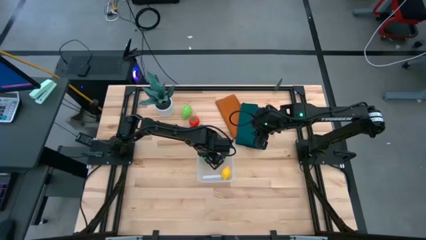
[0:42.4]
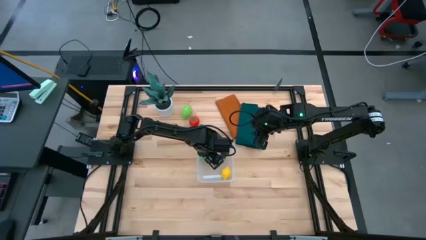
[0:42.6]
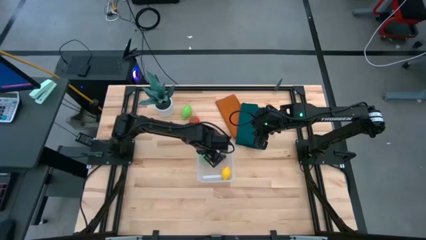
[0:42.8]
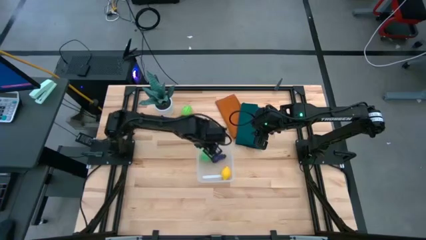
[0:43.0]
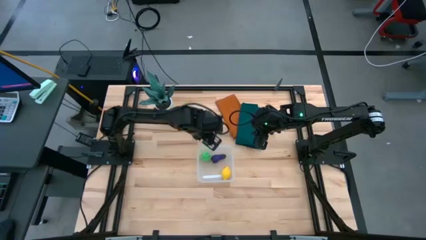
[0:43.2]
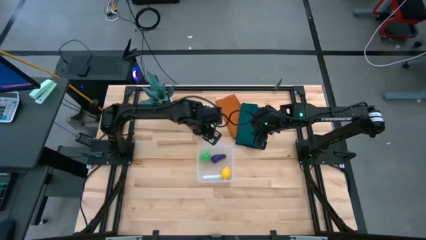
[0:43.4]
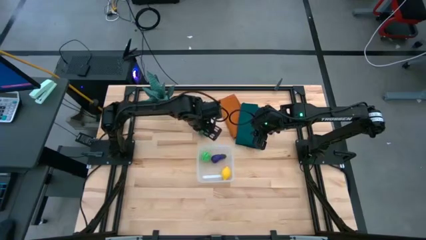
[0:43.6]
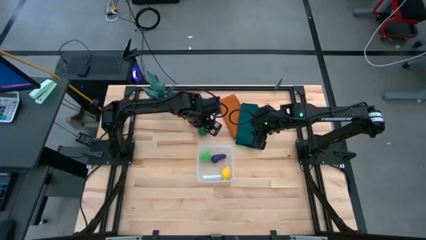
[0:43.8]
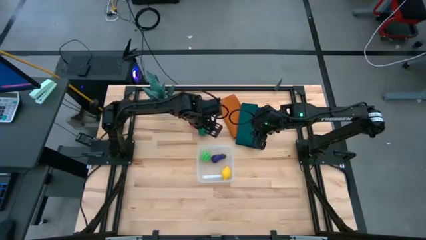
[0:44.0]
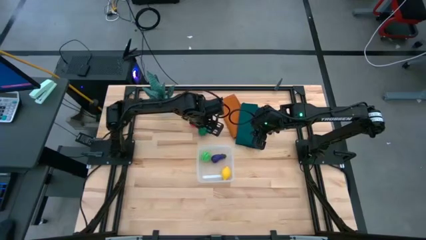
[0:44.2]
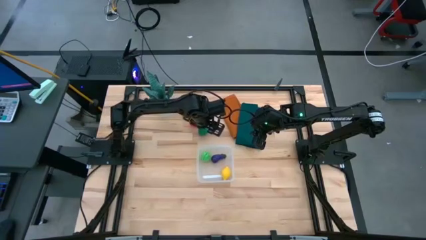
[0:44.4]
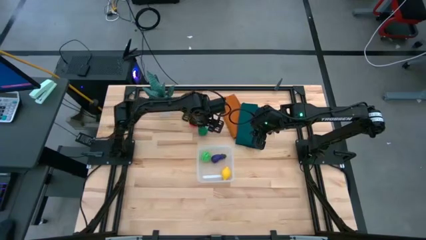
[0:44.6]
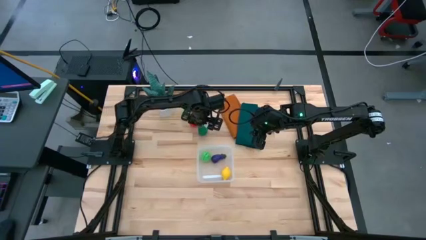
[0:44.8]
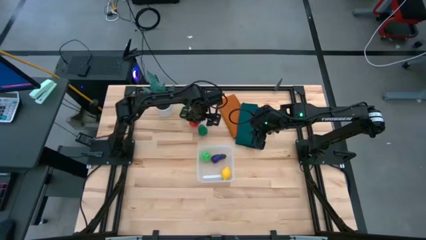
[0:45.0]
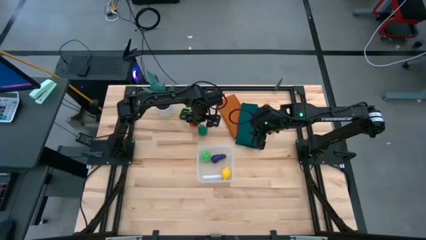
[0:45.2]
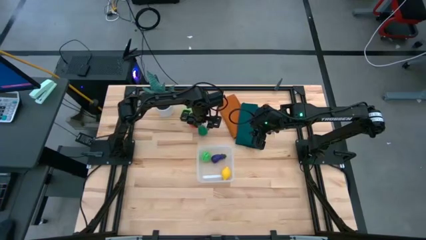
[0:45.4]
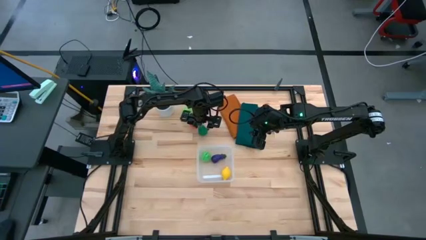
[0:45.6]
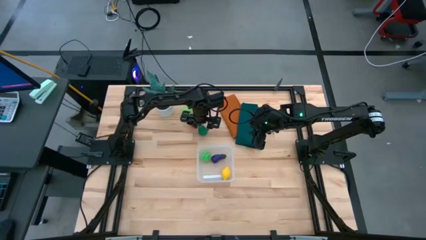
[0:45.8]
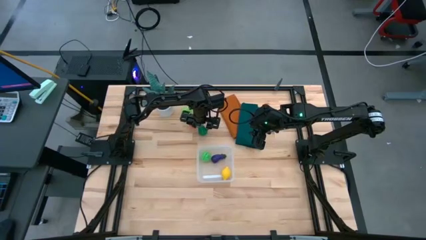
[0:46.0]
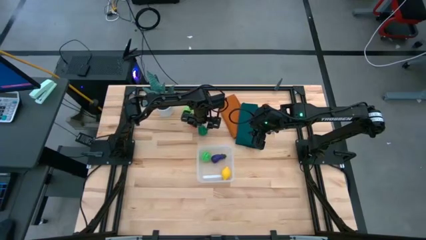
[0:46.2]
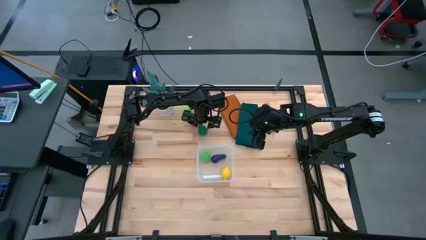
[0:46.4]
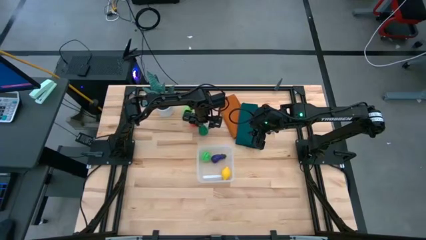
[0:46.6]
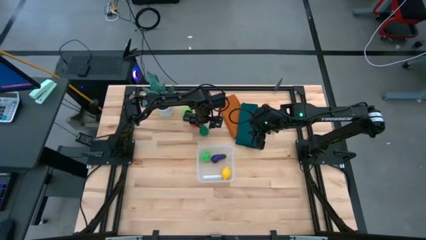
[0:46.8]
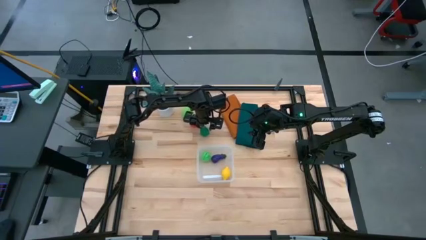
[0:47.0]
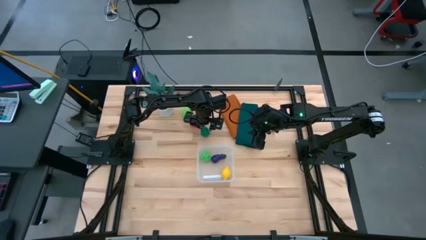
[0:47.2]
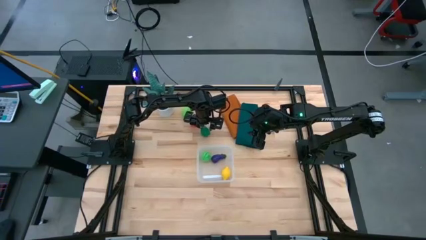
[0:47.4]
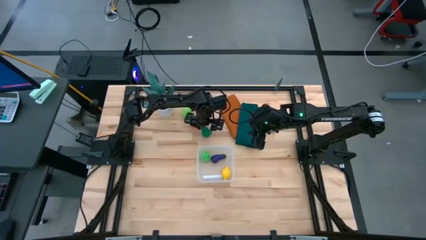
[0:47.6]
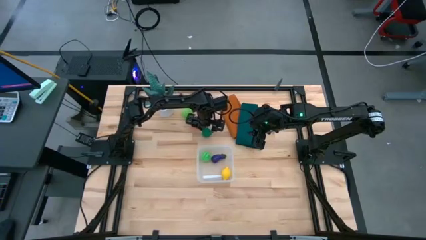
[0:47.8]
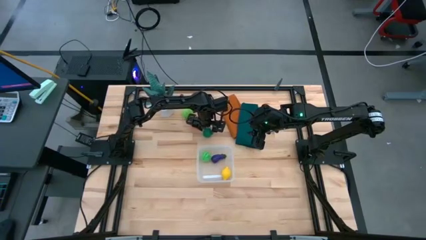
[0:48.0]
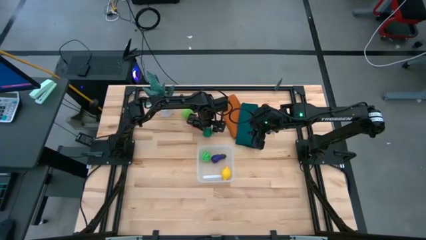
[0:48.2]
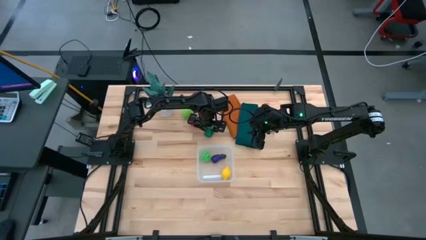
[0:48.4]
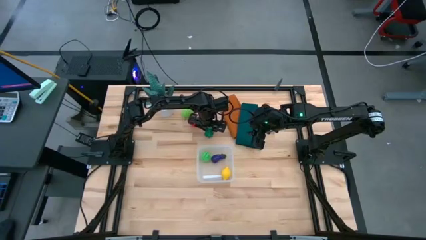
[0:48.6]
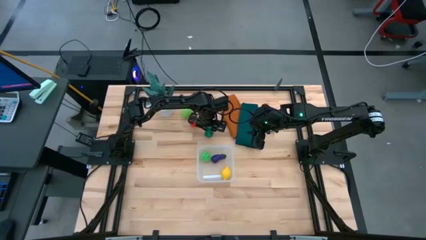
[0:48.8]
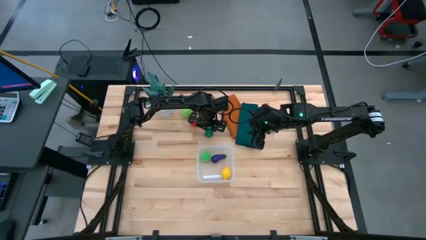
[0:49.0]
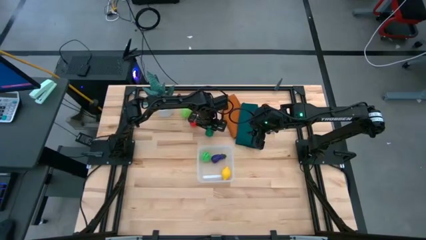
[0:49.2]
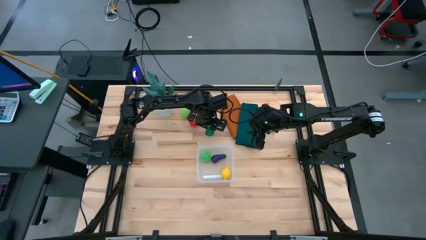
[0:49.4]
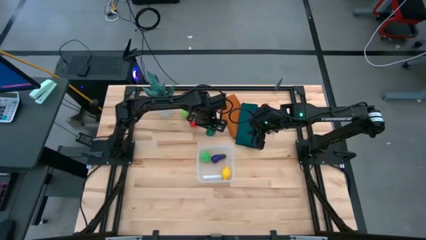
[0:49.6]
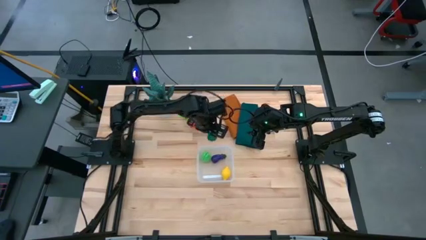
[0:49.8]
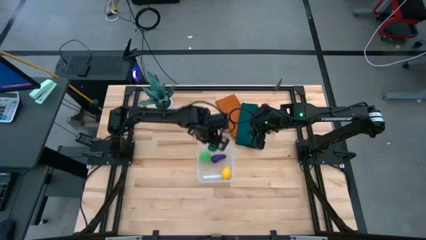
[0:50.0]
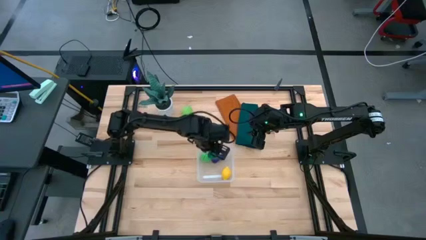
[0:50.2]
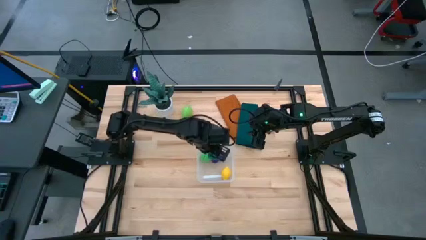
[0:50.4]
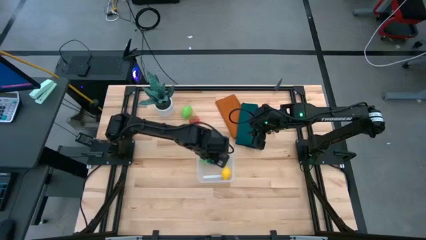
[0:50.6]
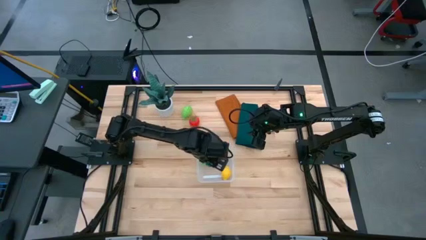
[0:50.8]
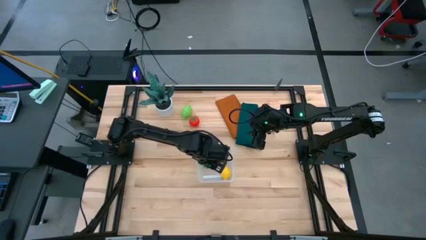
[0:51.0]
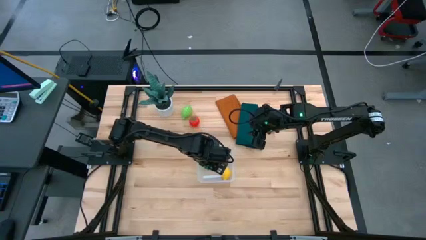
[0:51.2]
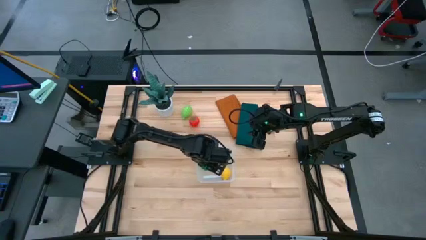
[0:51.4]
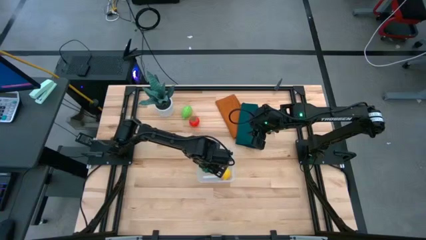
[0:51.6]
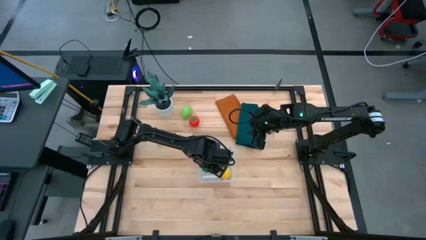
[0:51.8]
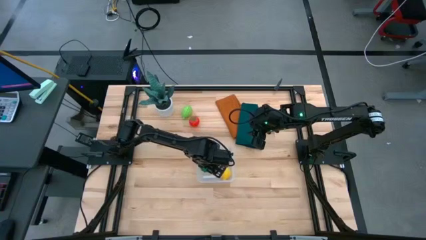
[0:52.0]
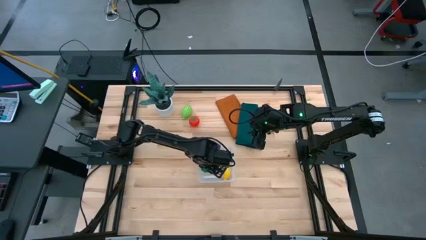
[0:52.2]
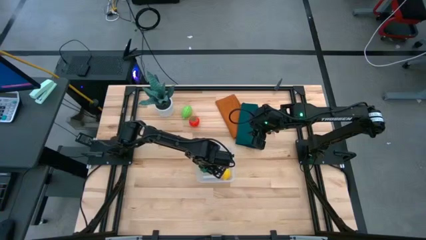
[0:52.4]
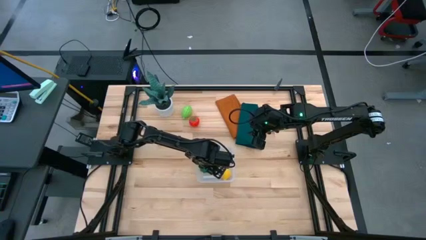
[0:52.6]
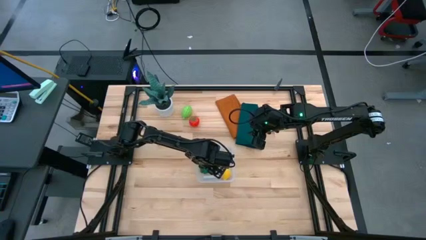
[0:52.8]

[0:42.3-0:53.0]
Task: Pick and placing Produce into tupperware
Put the green bell pepper into the transparent container

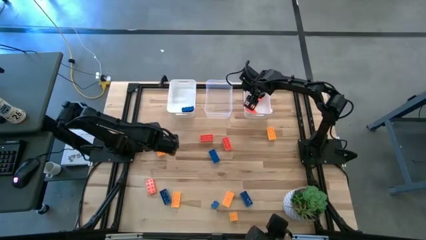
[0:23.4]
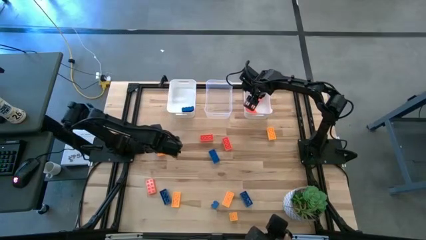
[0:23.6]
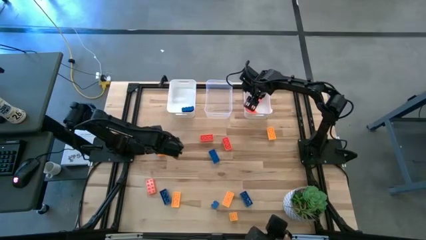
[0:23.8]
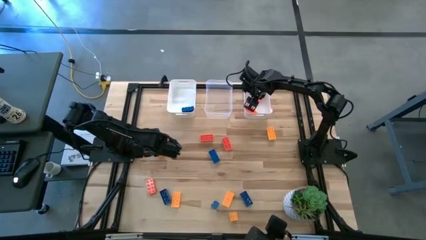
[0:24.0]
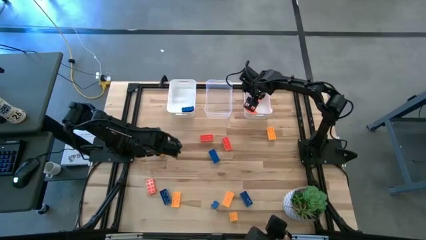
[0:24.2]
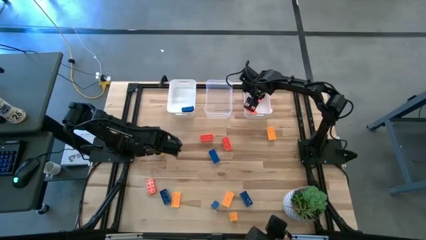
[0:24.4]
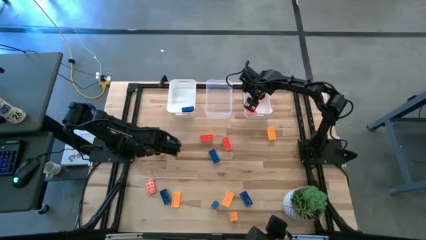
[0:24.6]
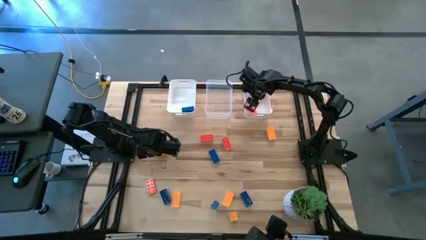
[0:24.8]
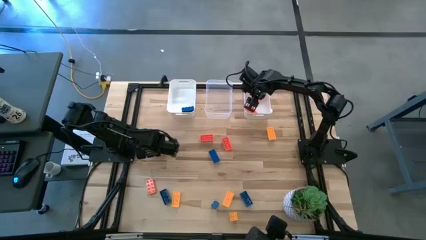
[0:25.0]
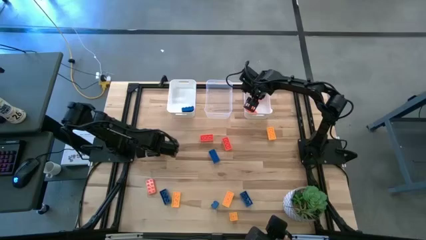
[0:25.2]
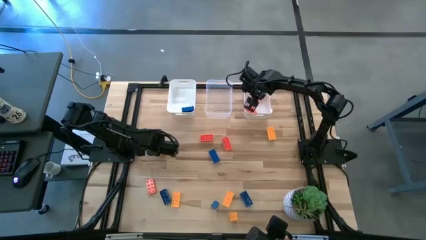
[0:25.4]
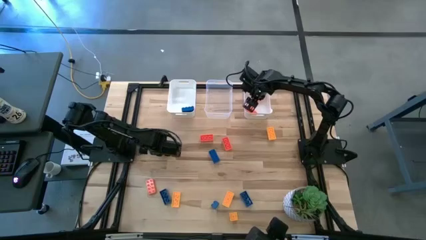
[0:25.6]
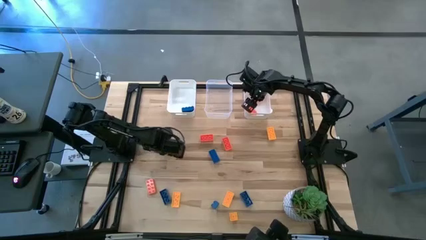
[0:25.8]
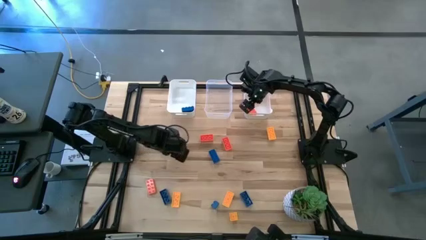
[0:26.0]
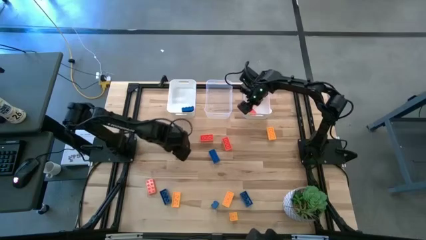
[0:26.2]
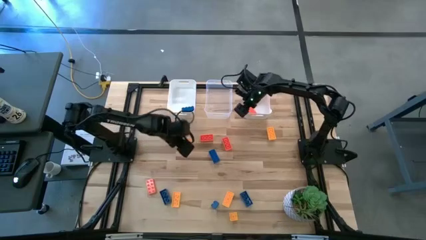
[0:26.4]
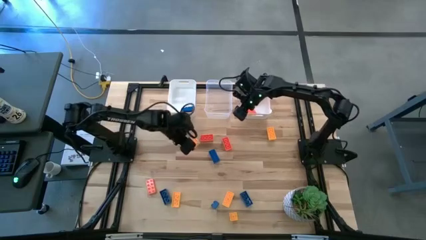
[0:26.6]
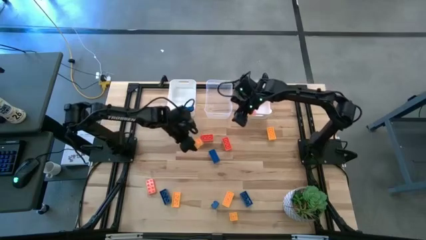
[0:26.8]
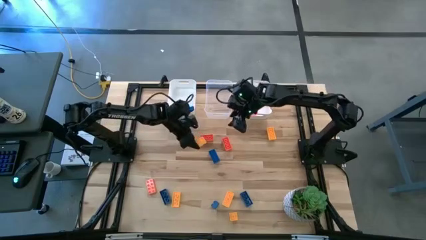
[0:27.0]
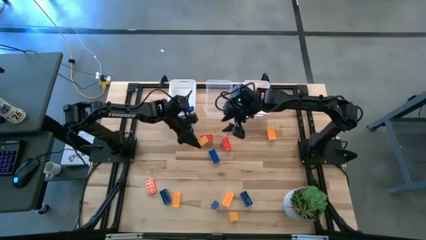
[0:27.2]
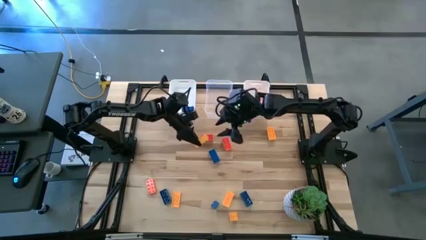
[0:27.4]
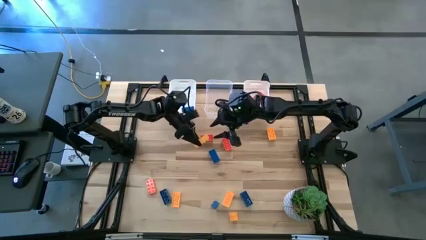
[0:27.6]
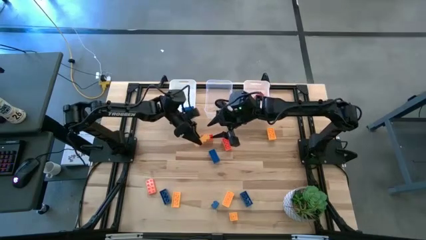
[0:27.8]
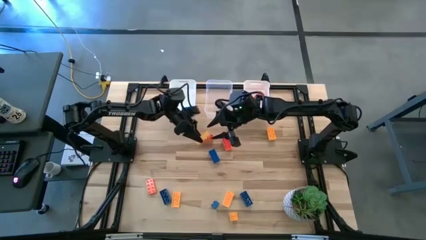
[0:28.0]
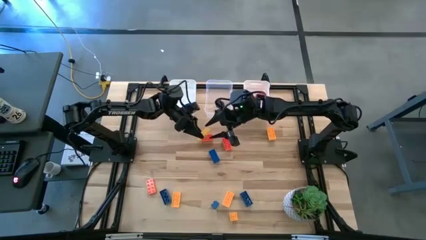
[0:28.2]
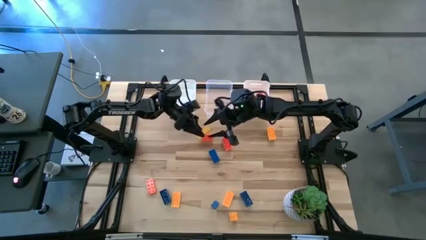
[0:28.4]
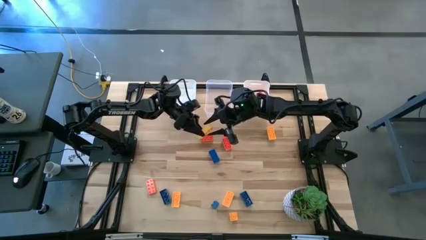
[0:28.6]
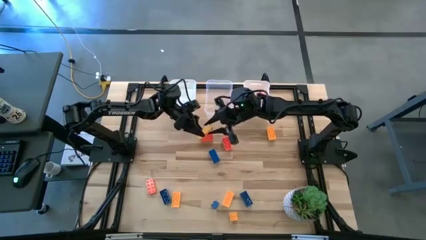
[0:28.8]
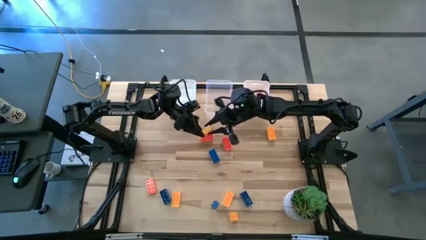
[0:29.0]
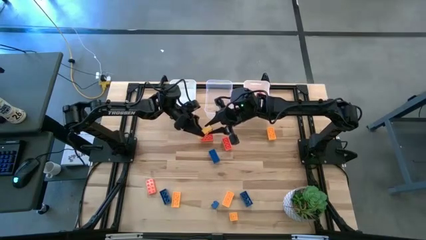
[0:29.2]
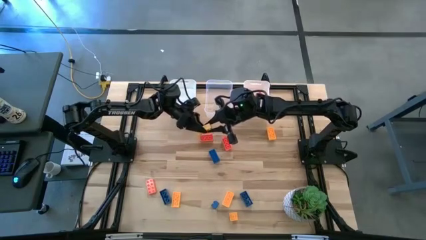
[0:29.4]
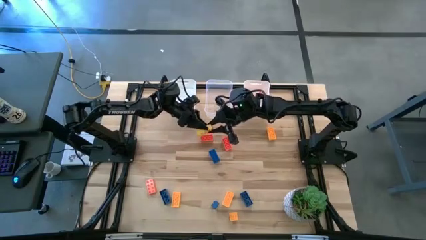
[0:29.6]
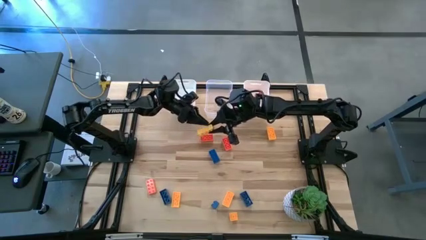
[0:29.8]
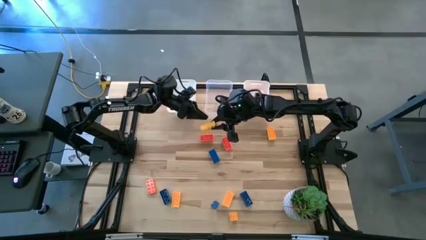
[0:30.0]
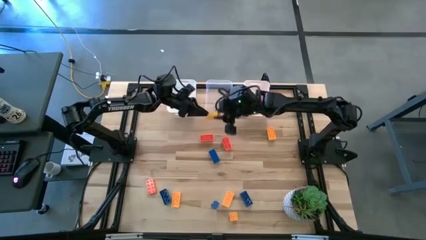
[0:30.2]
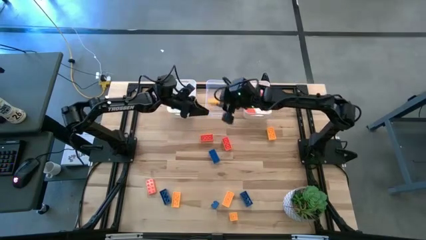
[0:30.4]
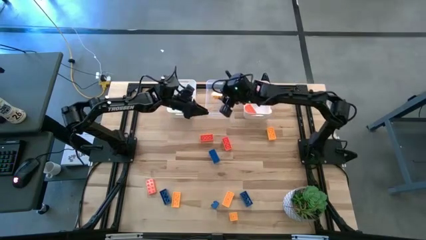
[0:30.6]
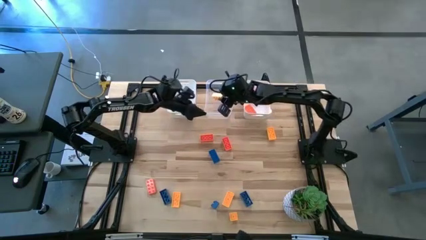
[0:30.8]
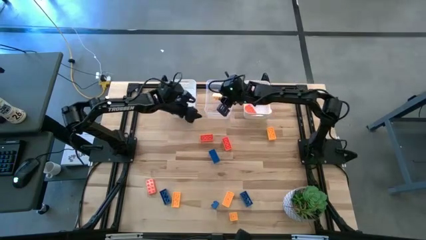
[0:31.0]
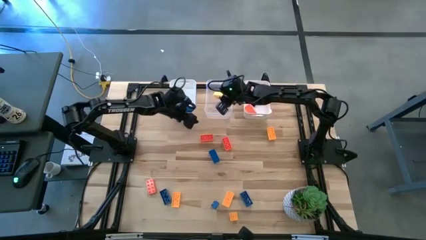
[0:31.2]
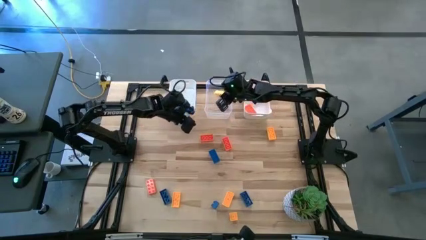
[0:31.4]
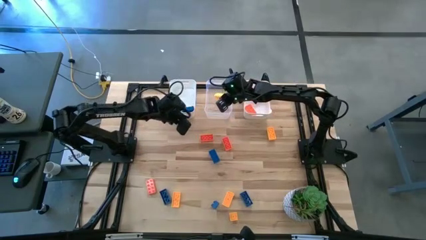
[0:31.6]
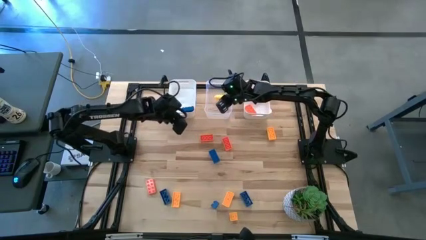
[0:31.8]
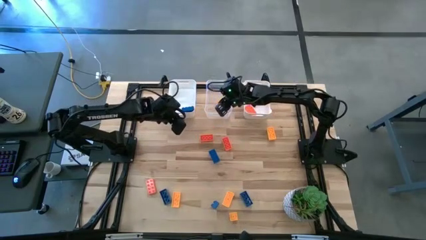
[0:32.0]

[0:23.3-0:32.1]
Task: Sort & place blocks by color
Put the yellow game piece into the transparent bin
